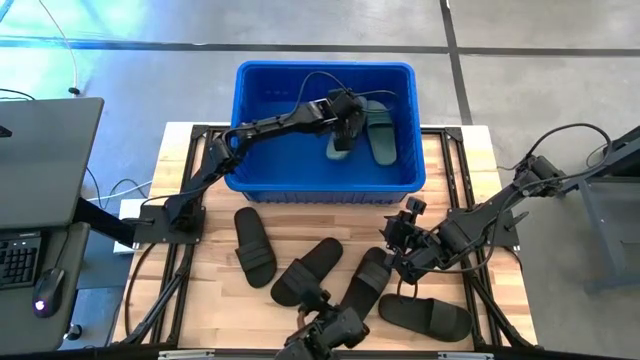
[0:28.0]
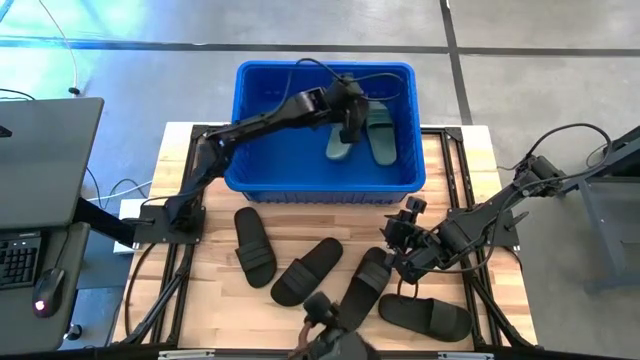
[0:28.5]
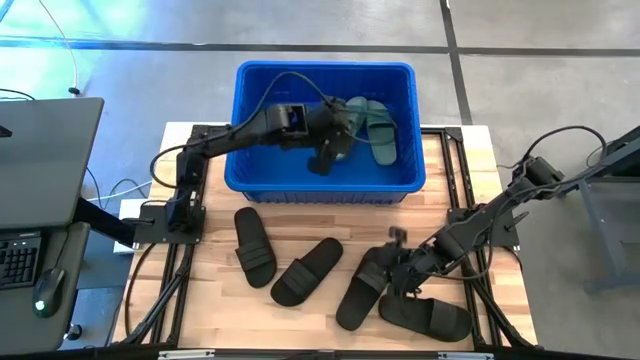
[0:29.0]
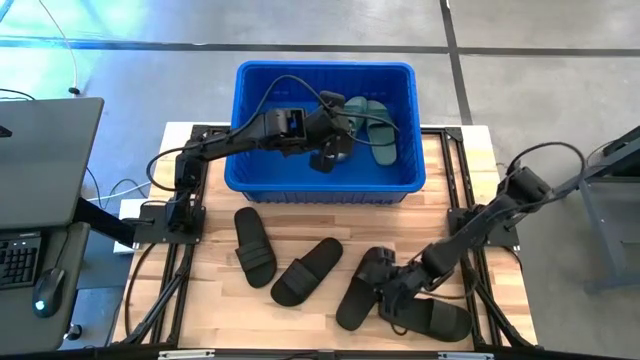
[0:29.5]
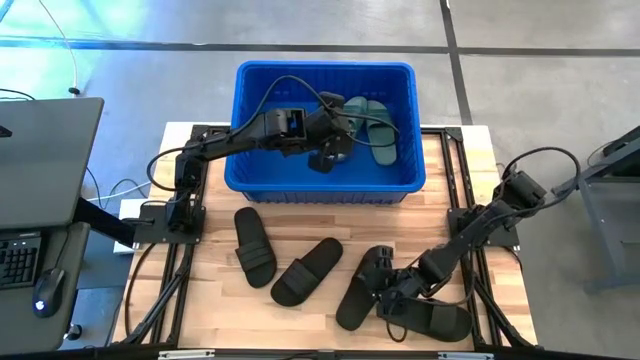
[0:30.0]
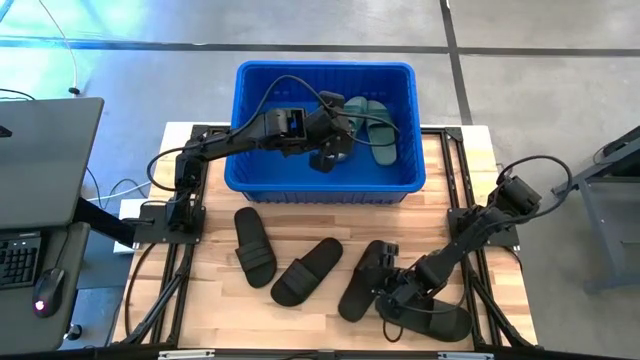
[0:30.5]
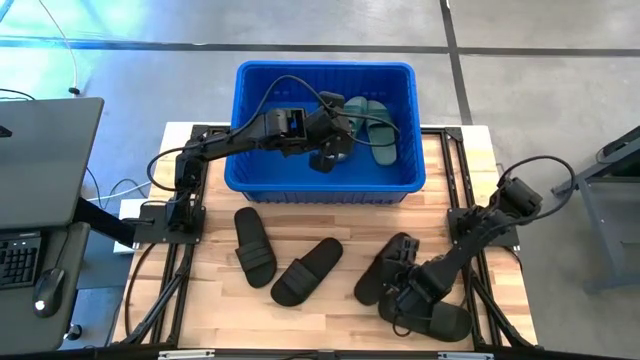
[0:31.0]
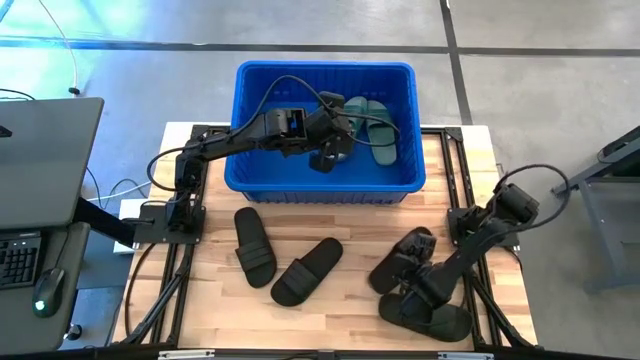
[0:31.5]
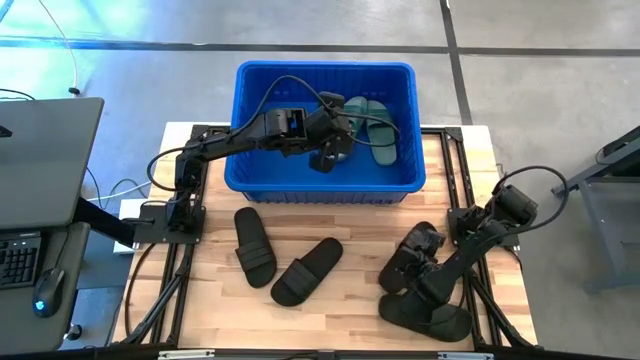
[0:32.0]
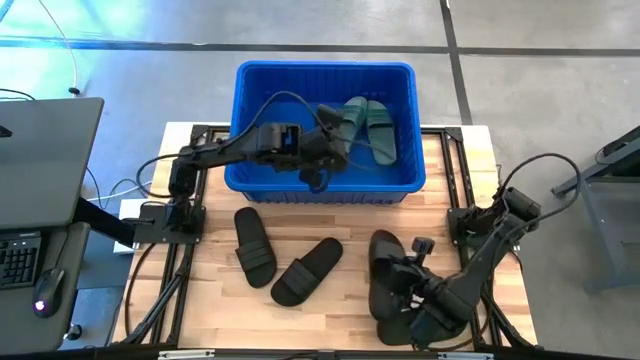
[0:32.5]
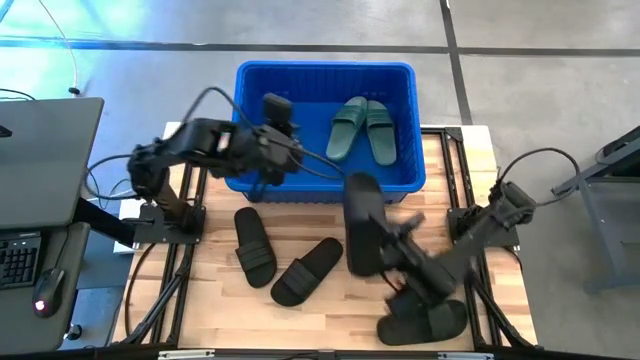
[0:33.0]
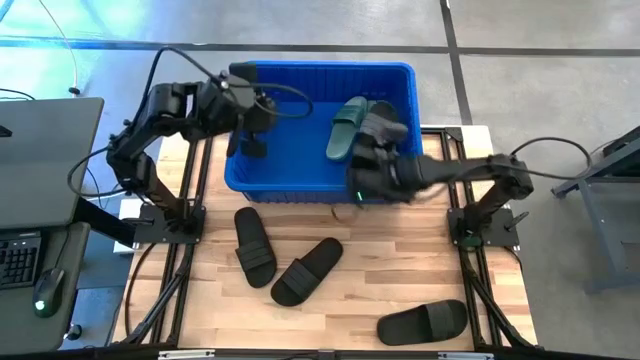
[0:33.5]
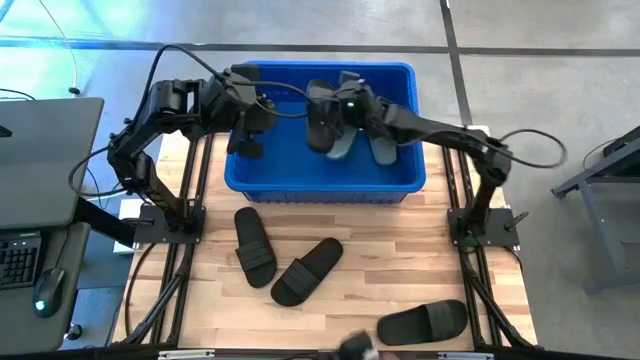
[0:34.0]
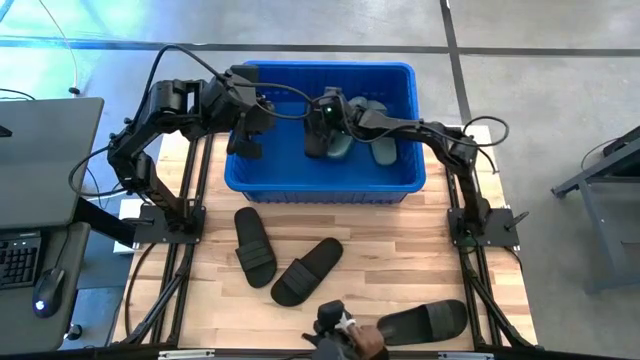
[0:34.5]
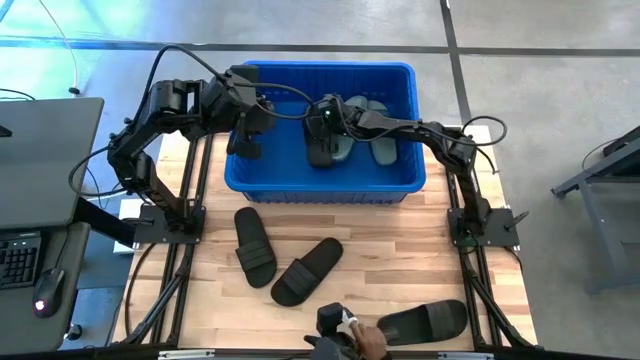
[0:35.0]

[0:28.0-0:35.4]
Task: Pick and place slides into bin
Put the black slide into the blue container

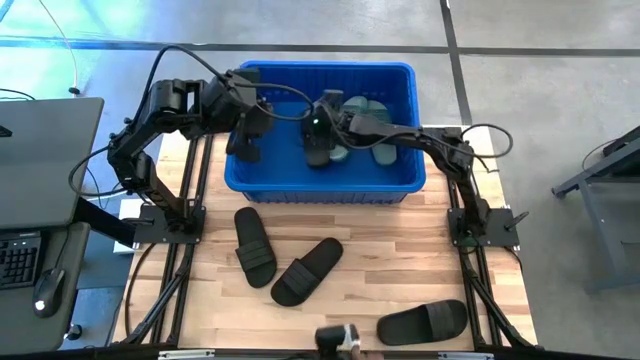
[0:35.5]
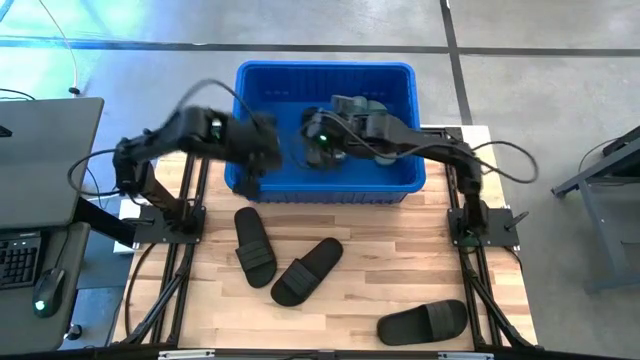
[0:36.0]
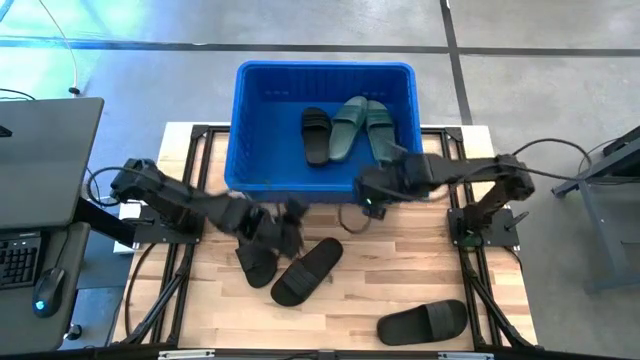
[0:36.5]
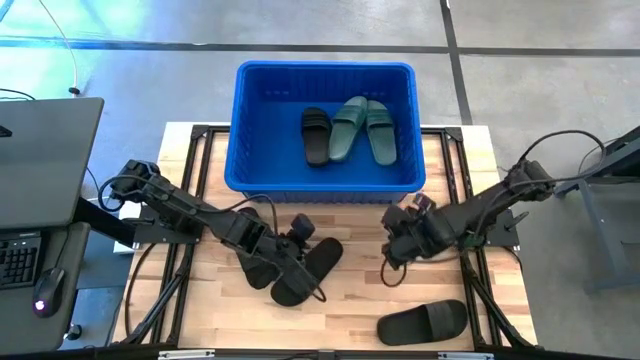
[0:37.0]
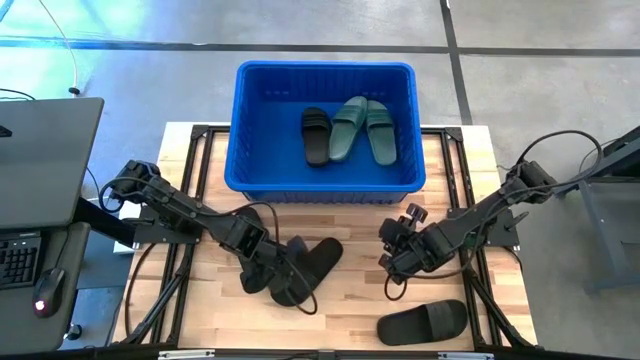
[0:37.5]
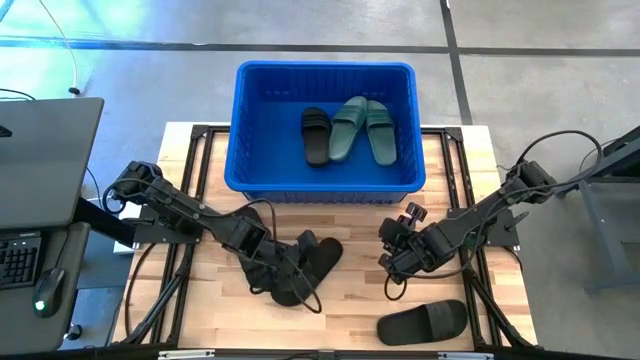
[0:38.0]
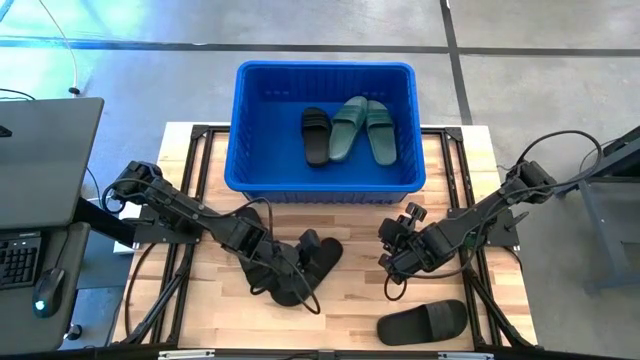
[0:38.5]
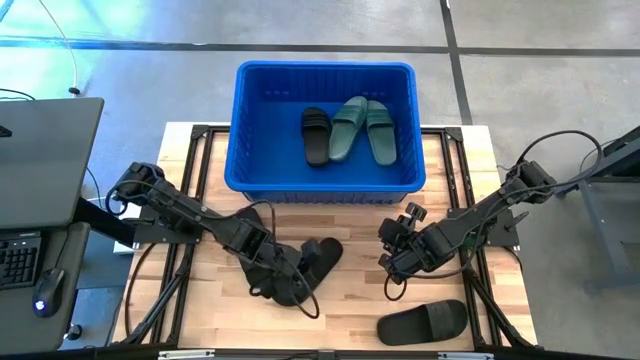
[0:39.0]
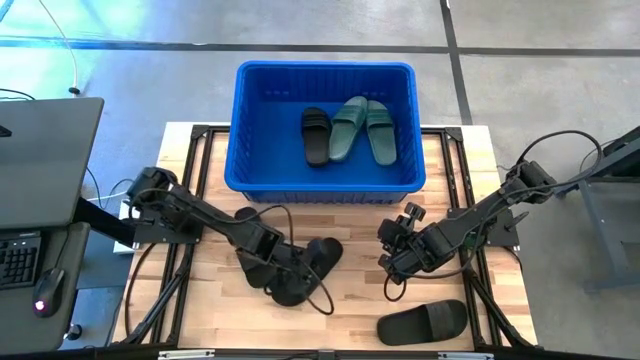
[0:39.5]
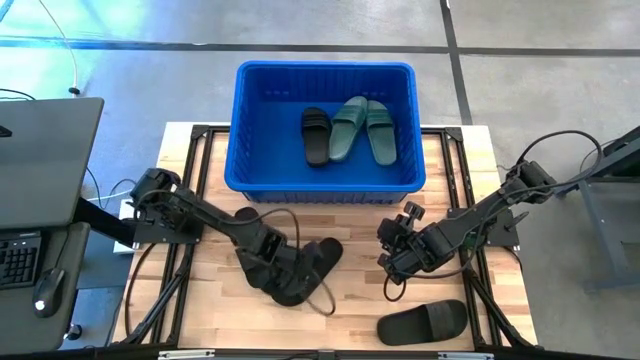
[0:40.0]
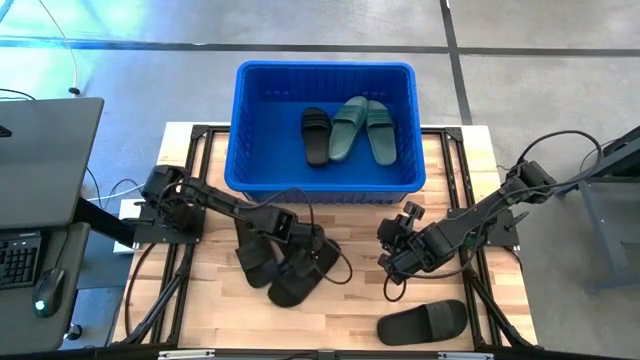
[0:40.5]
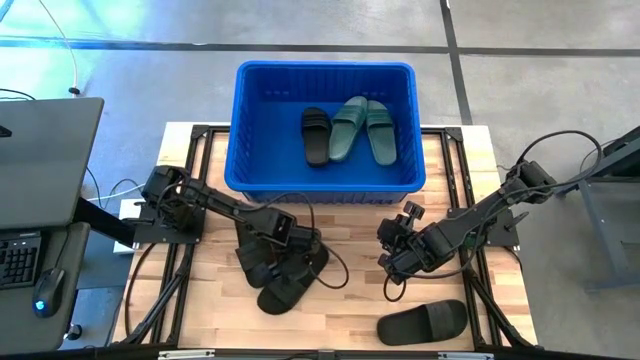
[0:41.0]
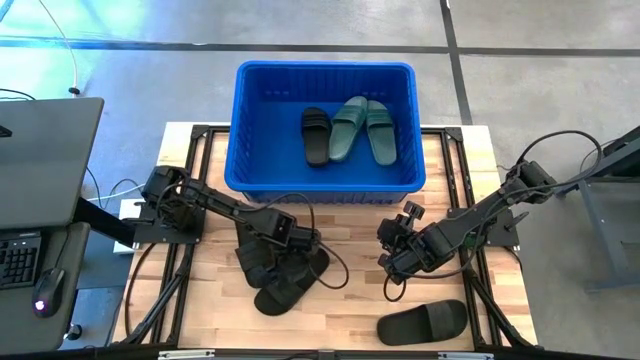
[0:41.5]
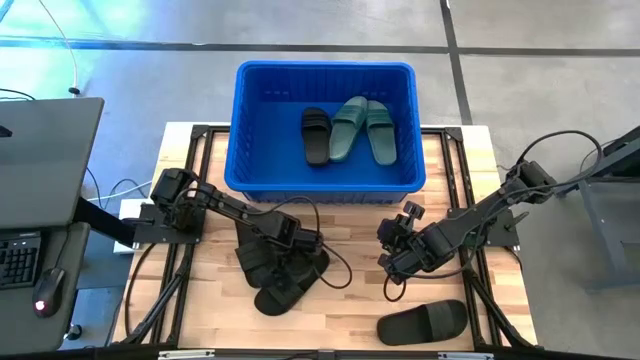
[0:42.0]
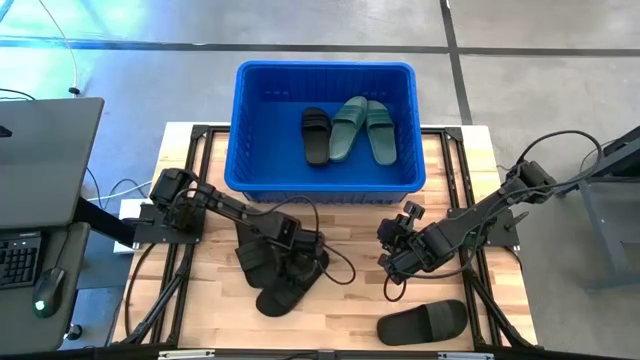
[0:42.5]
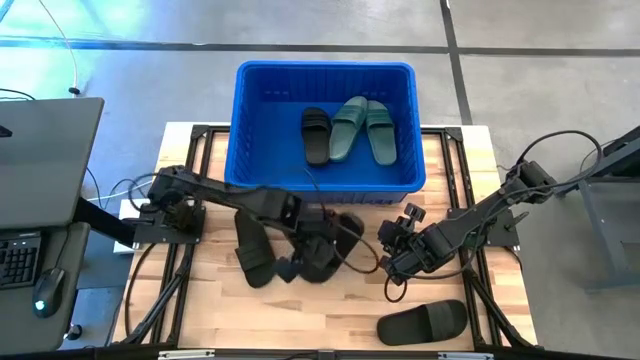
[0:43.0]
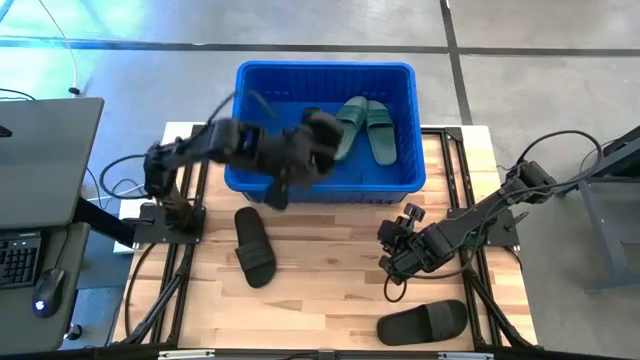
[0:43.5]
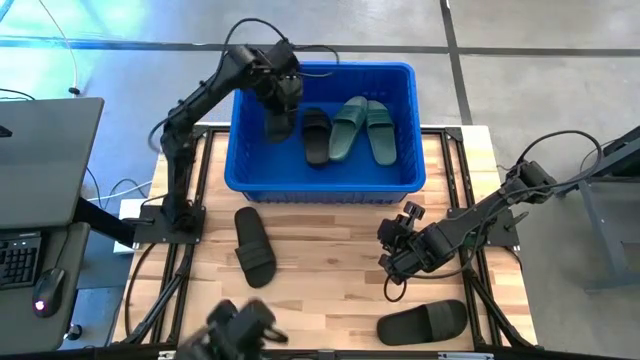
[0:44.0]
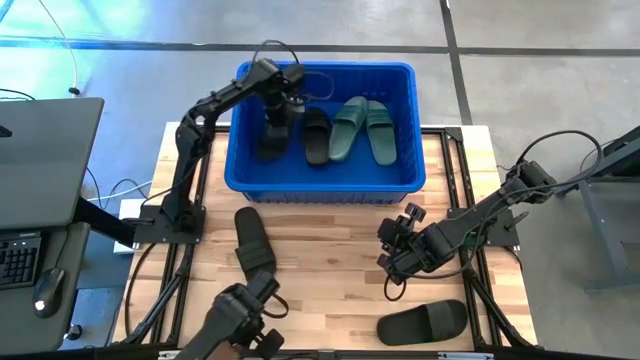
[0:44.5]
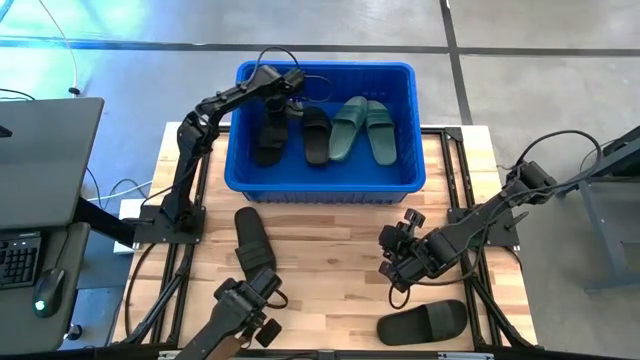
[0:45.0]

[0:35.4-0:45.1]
Put the middle black slide into the blue container

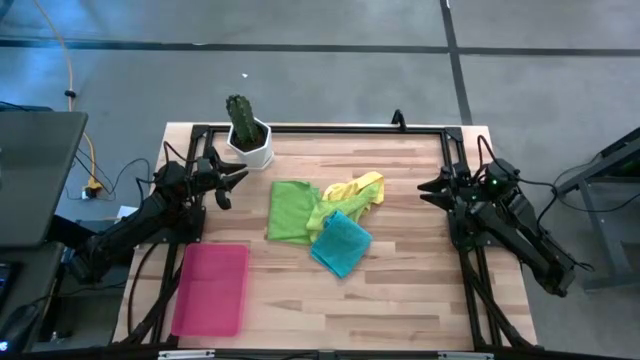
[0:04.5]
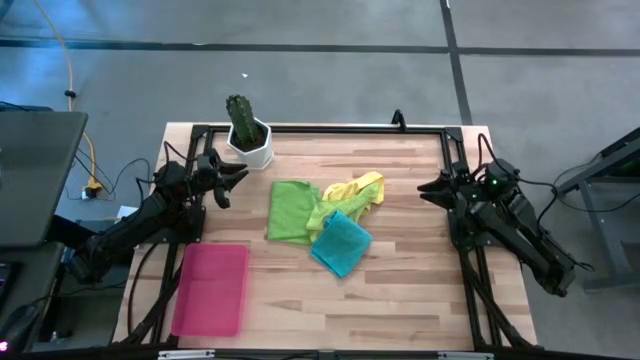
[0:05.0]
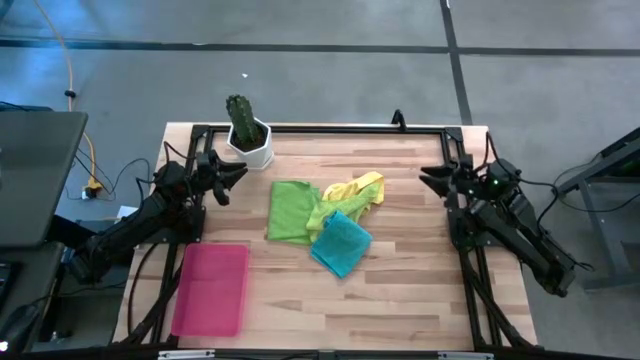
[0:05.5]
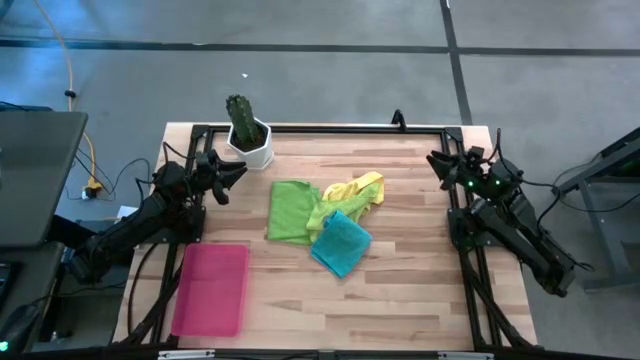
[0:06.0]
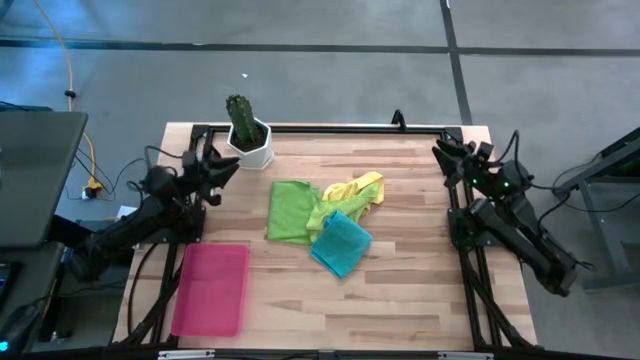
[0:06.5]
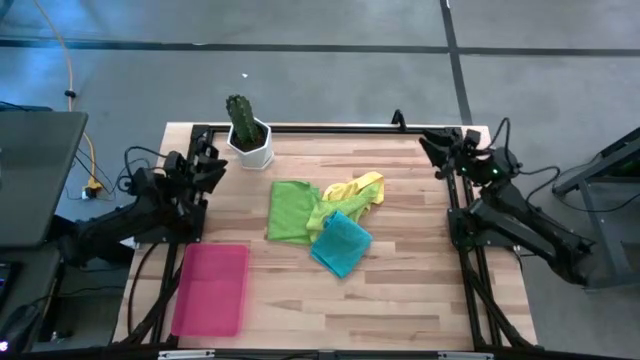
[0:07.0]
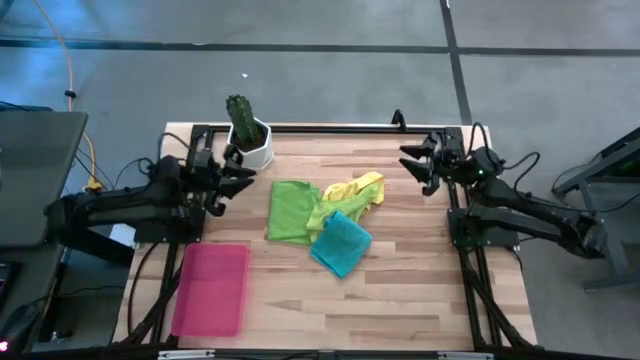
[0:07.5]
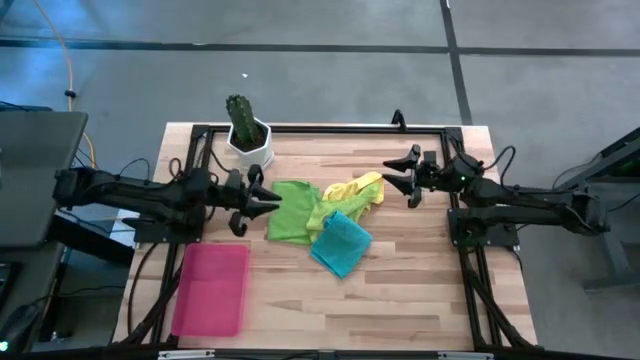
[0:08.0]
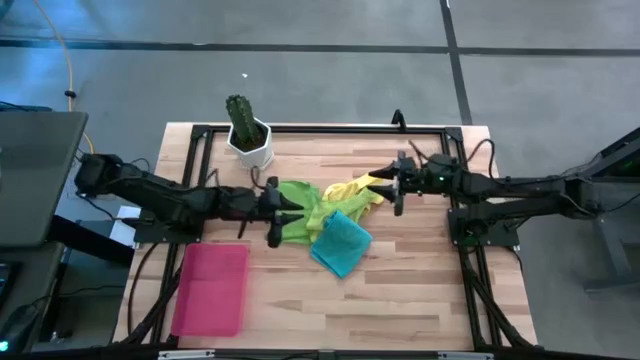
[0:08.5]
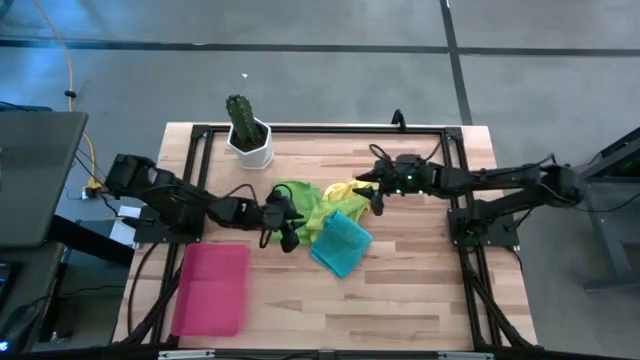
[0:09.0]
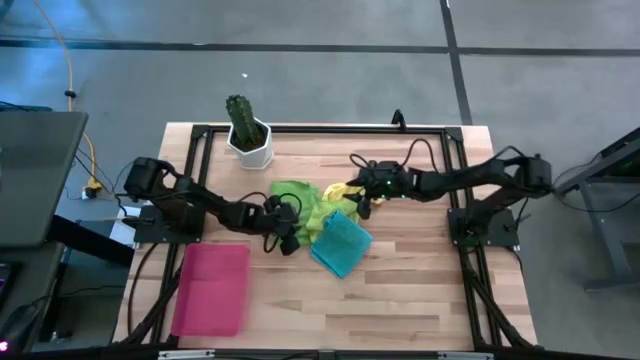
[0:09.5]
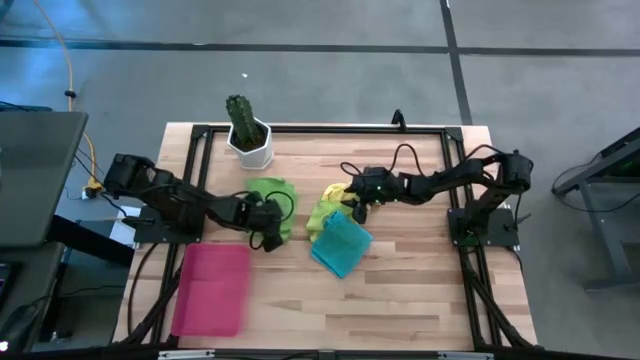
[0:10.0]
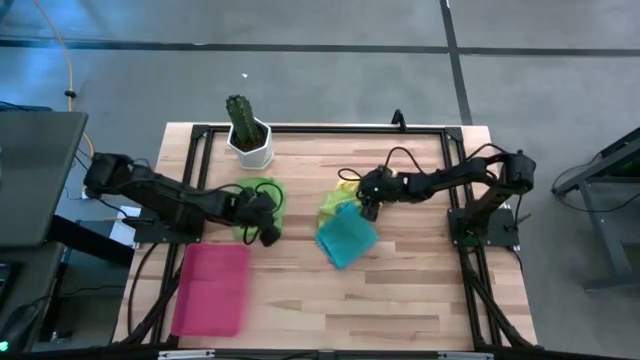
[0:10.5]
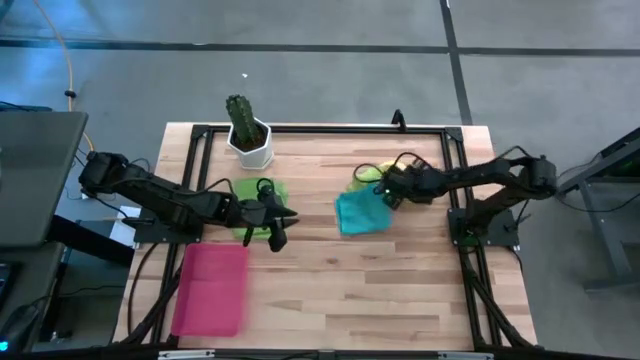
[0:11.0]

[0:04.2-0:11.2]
Task: Roll microfiber towels into tight, uniform cylinder then place into a basket
Prepare the table to roll the towels
